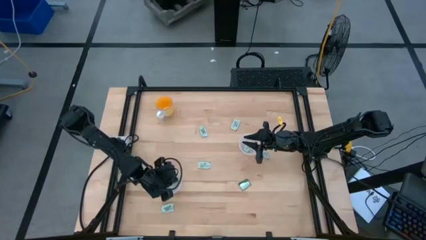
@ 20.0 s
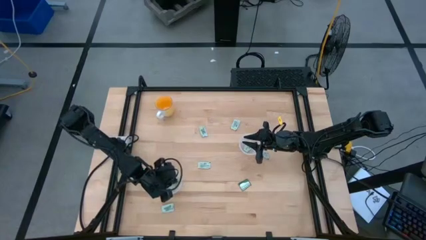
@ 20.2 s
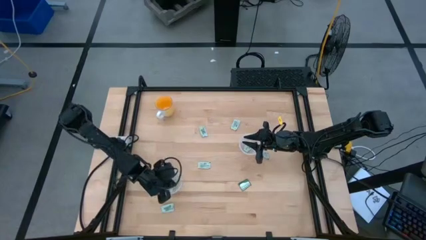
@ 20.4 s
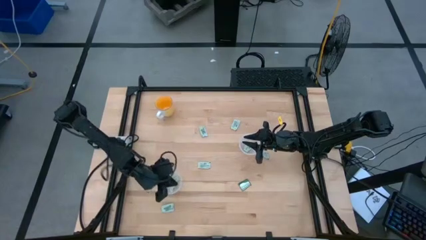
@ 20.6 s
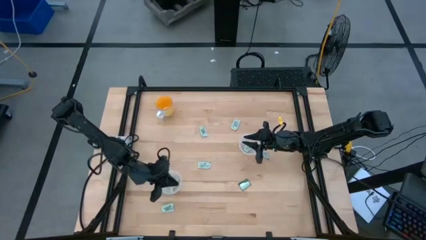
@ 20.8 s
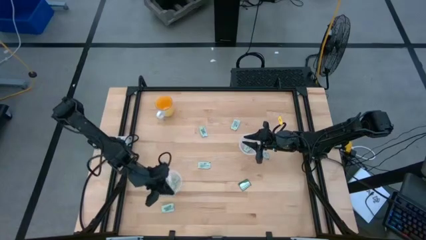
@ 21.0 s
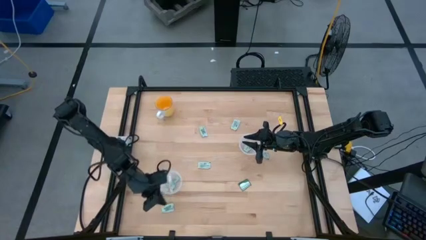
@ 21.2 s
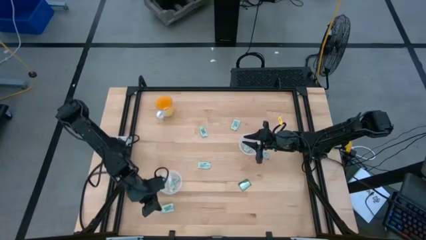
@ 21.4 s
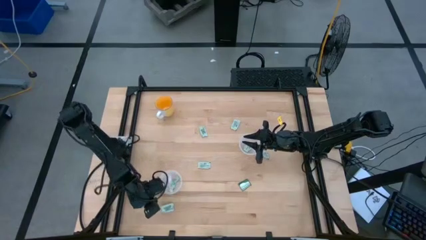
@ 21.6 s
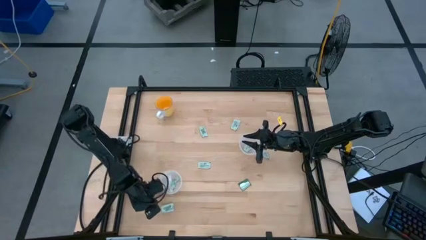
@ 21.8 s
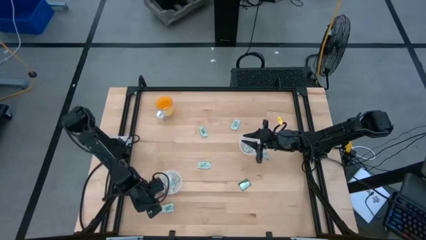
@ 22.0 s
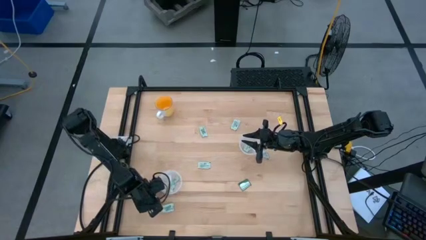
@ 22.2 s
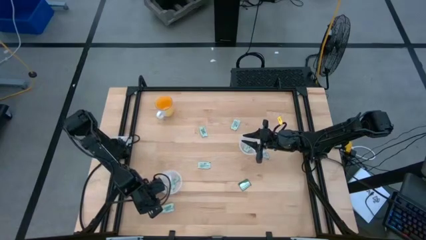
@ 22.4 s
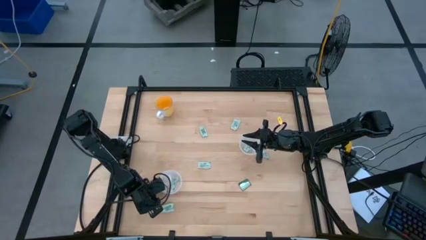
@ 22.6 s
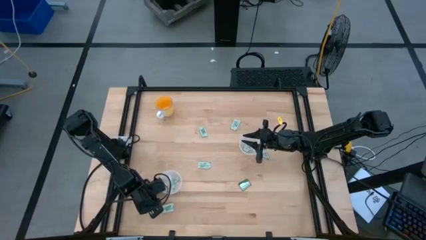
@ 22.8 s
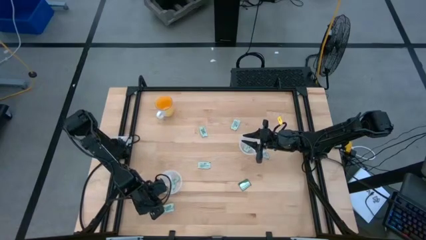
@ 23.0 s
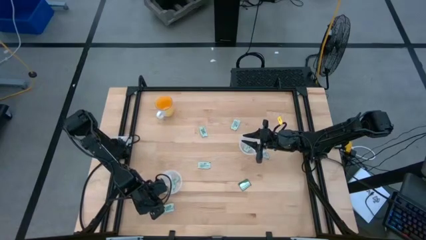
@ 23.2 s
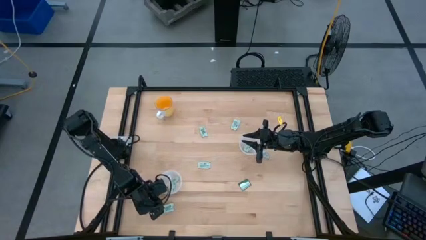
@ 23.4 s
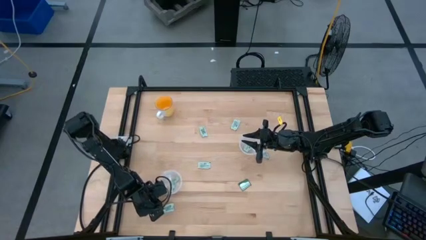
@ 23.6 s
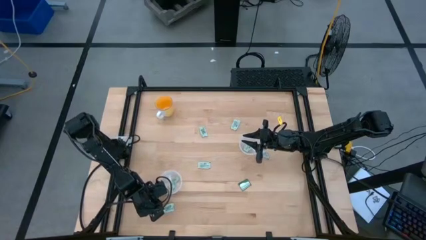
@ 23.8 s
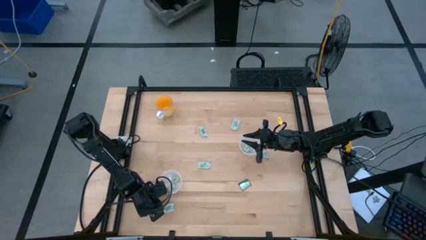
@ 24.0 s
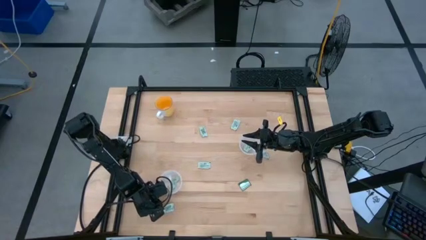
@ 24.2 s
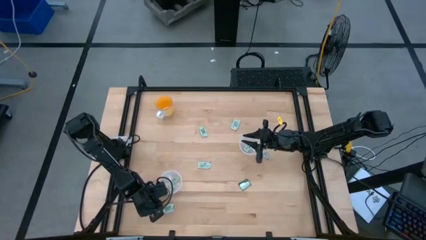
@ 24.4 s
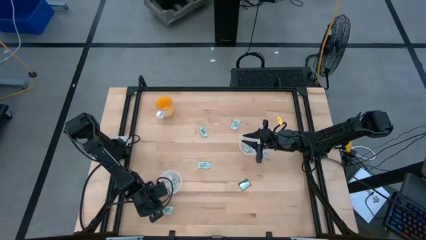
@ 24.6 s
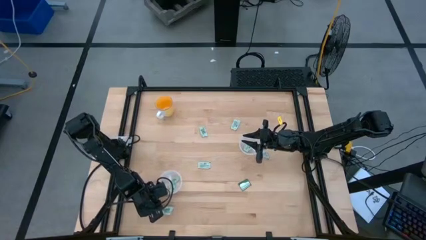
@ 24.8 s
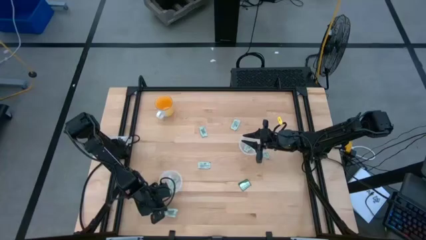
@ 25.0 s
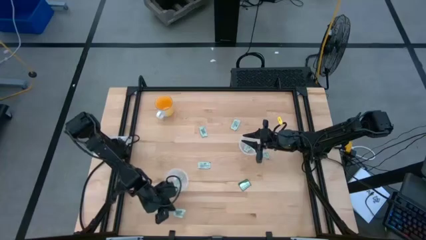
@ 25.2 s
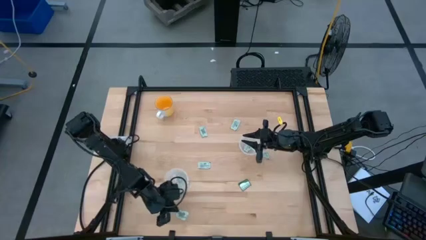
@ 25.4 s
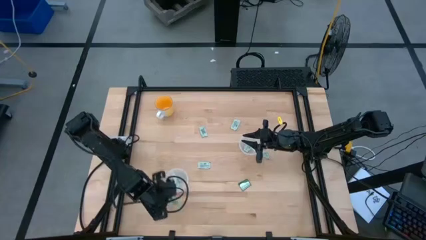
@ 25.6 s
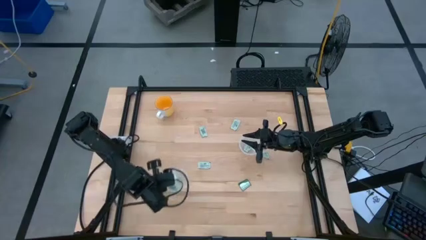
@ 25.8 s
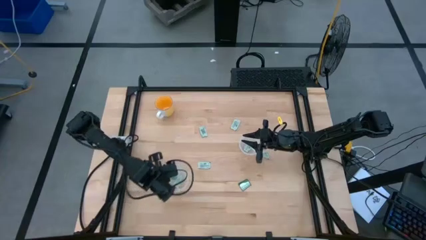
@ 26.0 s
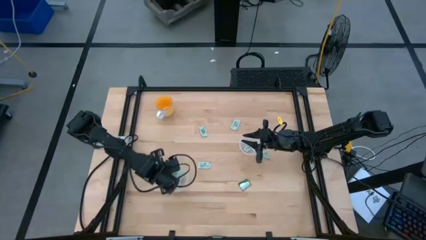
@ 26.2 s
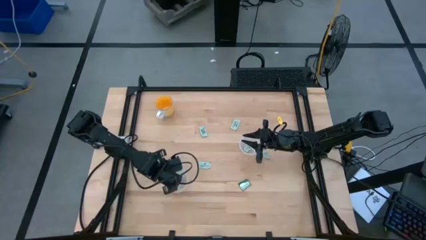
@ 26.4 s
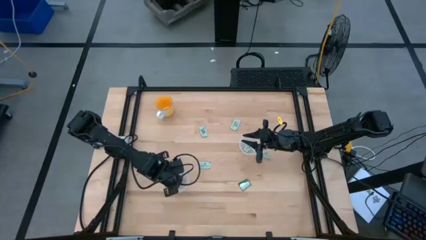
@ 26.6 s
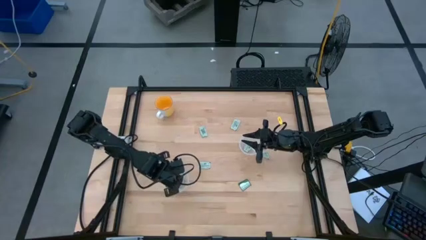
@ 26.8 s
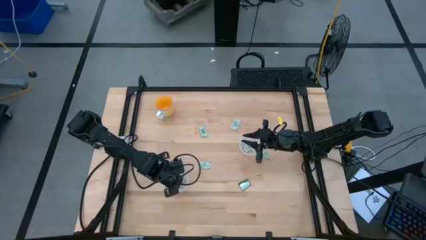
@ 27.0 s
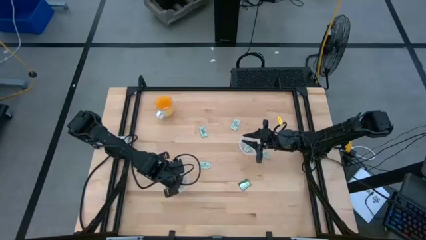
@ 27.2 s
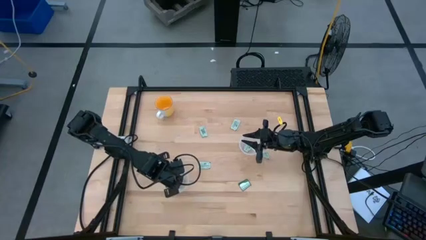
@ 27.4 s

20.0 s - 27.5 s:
Task: Pick and place Stevia / Truvia into bins
Put the stevia packet into the left transparent container

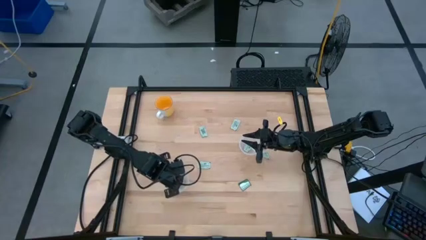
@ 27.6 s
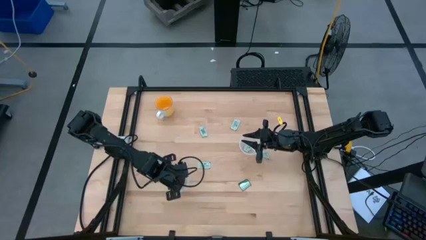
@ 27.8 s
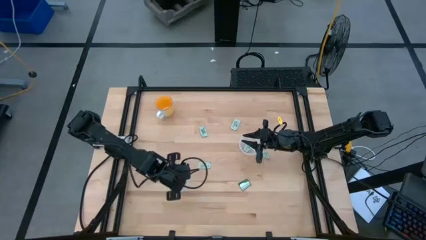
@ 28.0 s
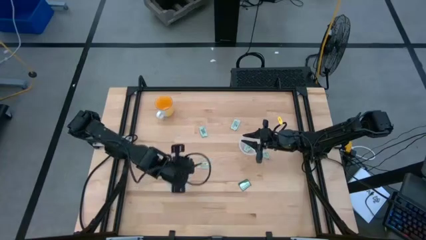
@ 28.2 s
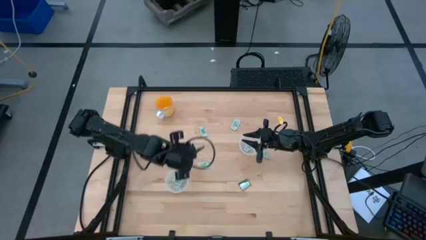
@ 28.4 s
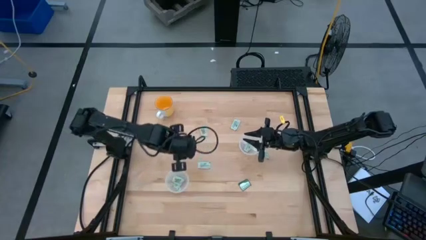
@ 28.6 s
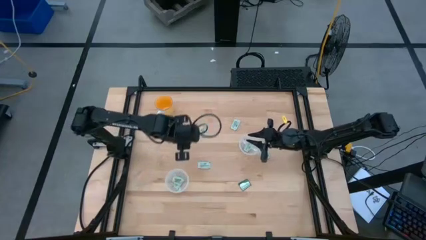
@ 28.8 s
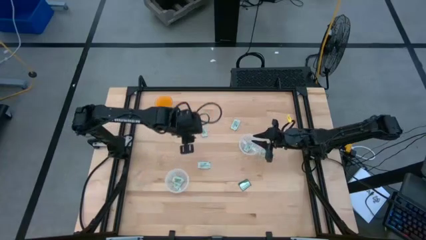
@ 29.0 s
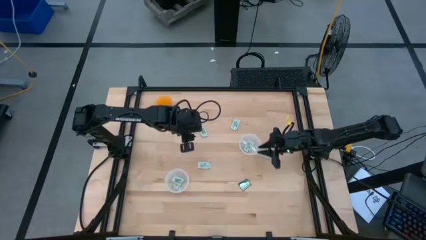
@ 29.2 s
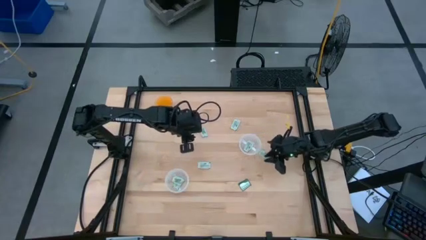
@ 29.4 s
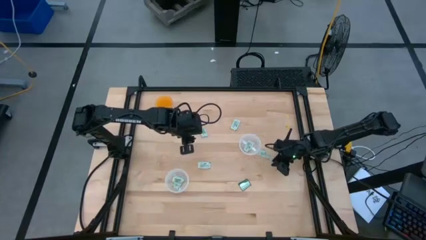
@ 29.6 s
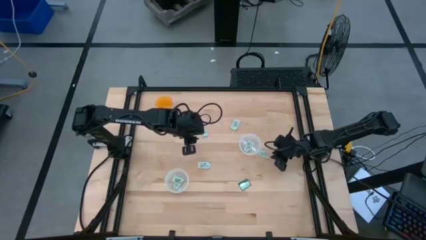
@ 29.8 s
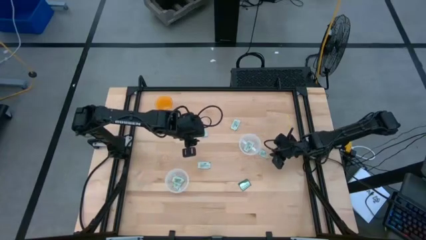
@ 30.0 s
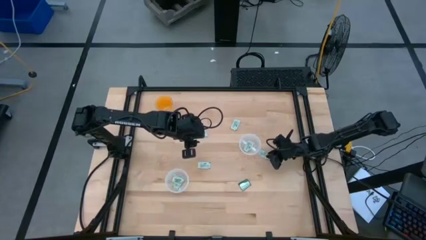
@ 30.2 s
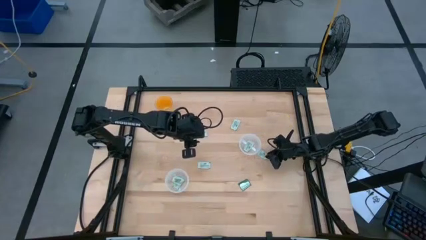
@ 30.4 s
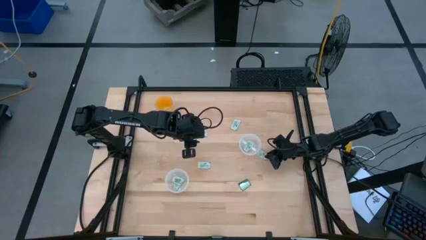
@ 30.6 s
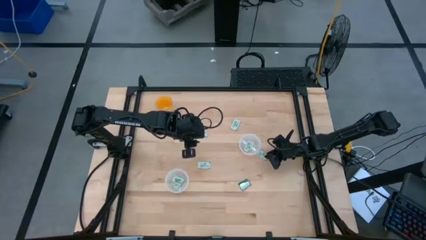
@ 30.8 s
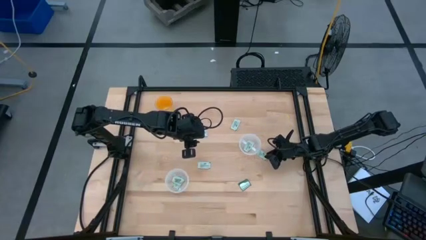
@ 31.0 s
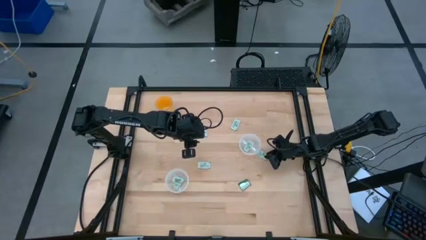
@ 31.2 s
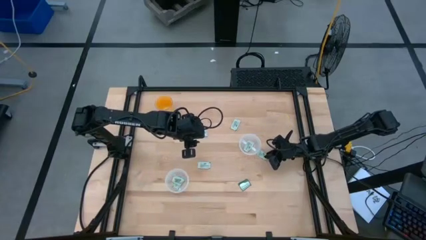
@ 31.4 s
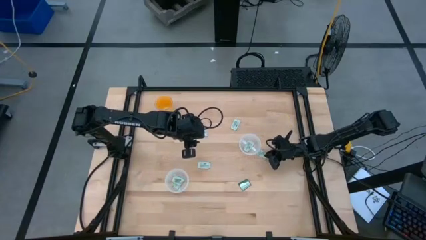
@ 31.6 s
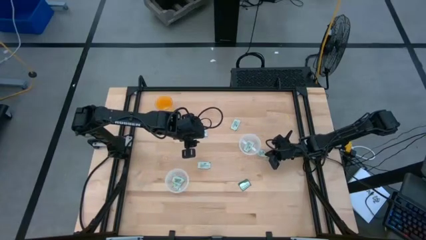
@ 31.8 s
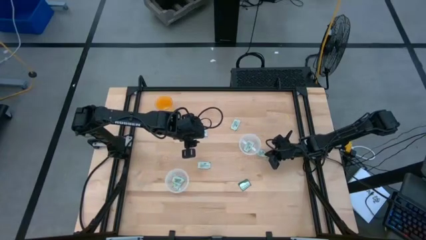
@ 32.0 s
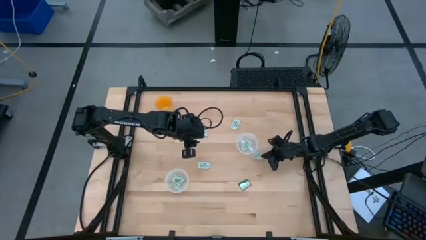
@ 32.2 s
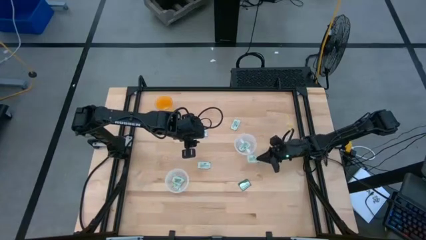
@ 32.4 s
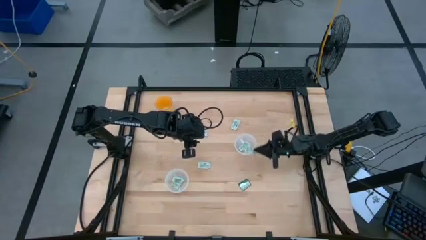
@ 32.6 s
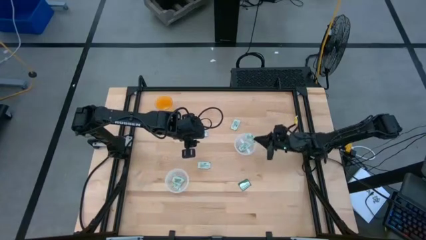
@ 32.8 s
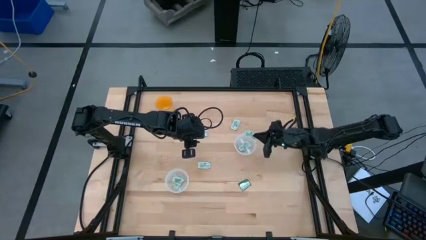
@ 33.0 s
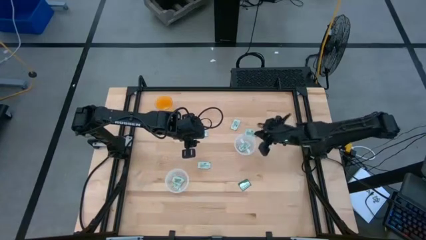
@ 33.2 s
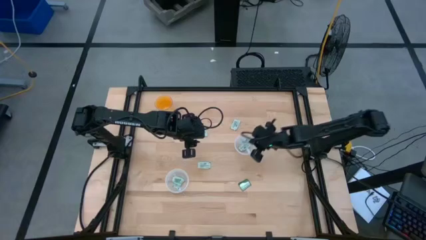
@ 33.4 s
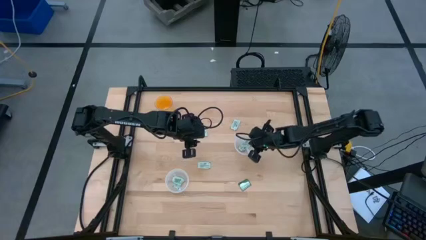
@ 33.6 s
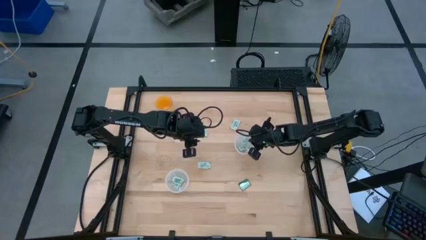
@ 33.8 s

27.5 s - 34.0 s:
Put the stevia packet into the right transparent container

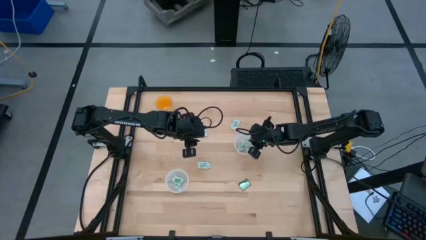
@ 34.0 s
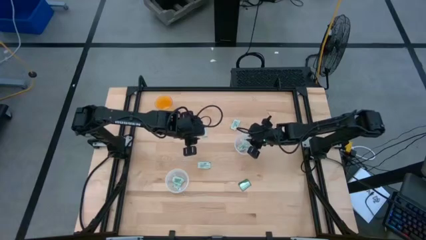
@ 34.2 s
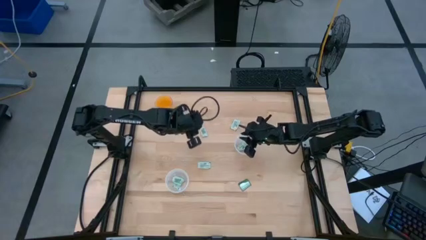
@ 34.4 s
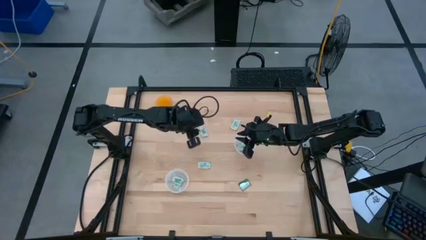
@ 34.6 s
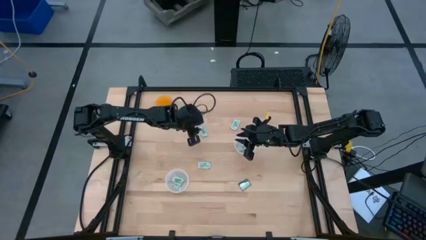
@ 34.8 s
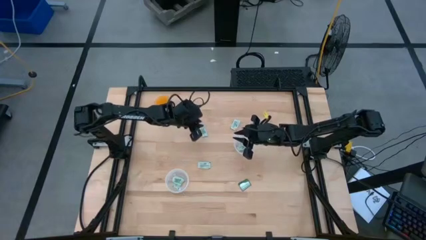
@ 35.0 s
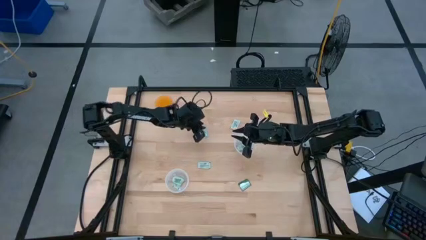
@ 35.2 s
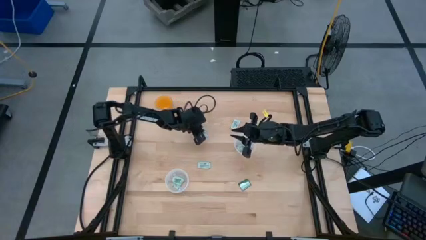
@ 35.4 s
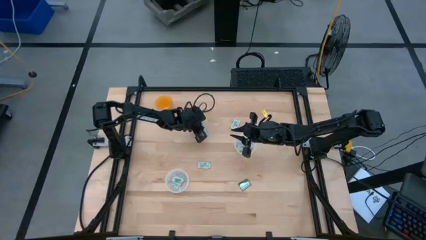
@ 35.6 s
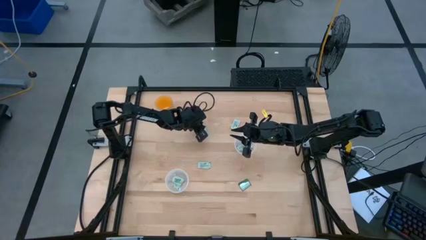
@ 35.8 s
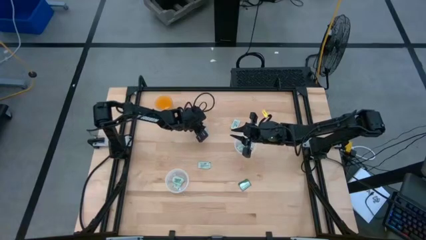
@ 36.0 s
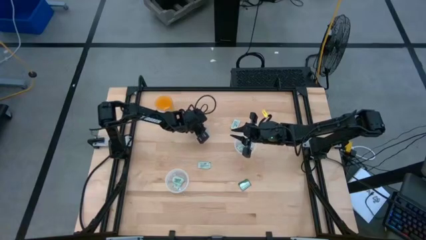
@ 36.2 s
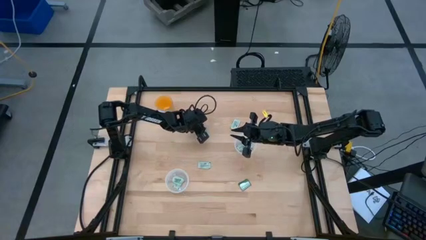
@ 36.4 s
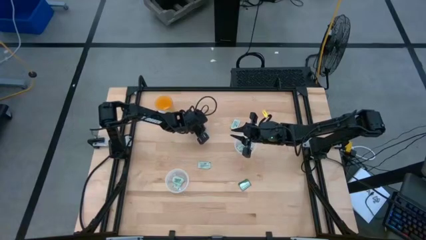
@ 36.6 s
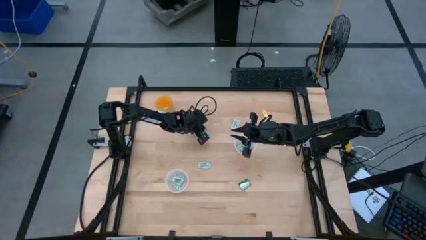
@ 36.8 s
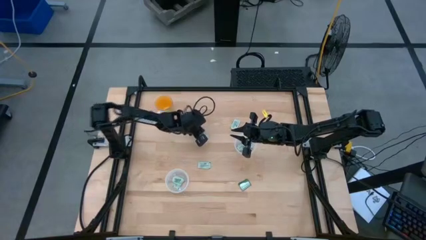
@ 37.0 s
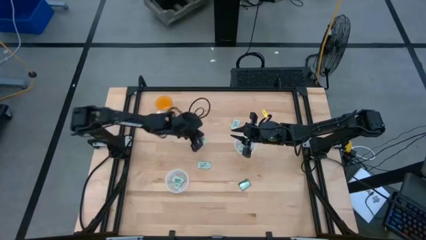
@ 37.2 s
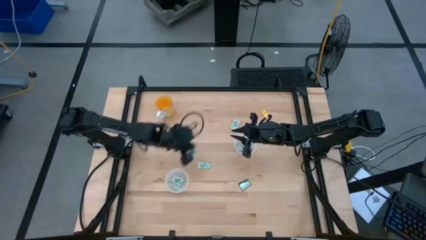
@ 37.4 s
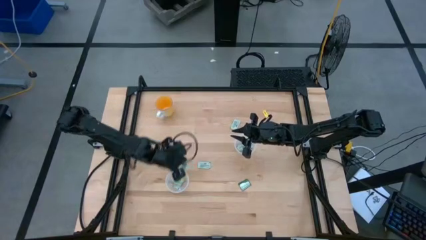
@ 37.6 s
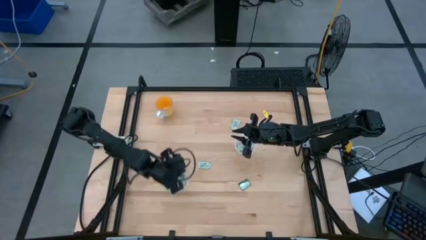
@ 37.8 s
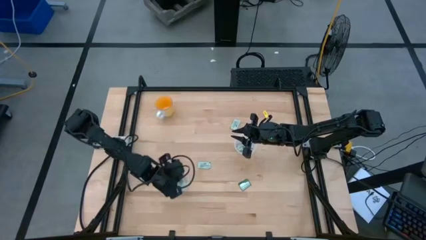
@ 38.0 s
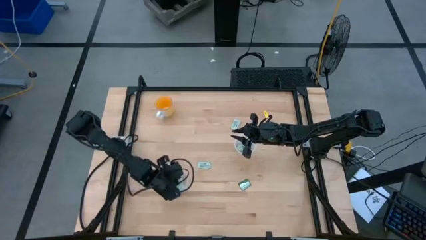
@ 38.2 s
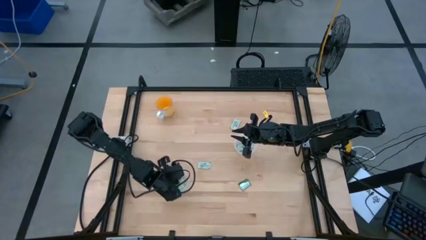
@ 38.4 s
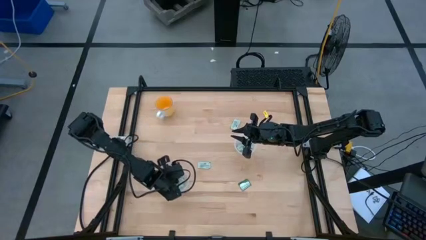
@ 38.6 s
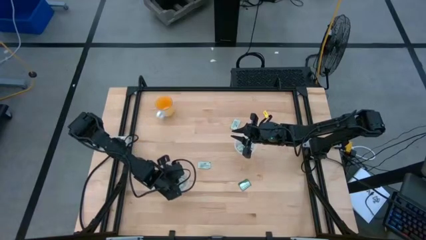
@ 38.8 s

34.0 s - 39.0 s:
Put the stevia packet into the left transparent container
